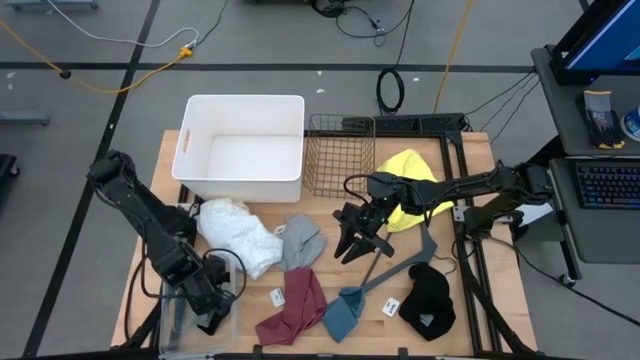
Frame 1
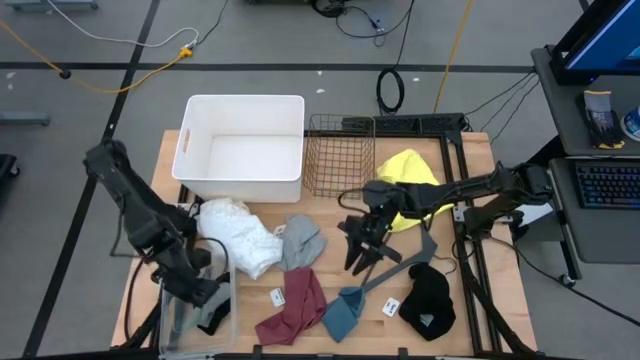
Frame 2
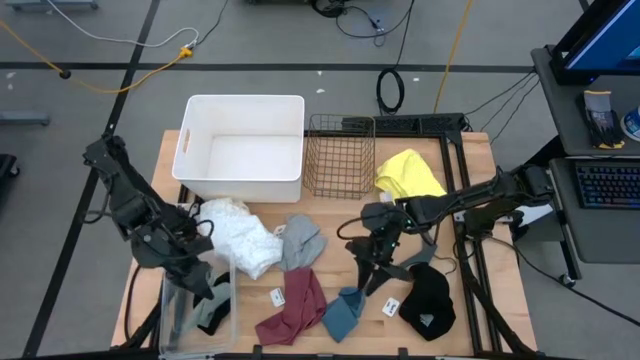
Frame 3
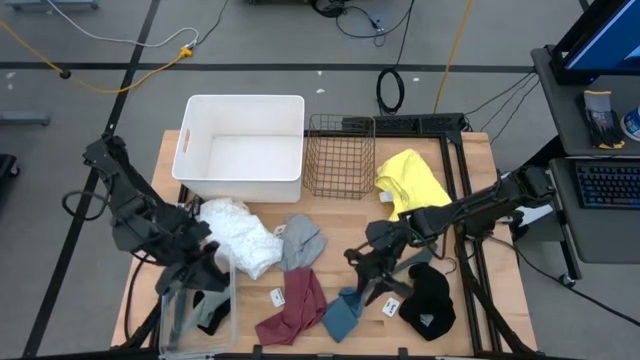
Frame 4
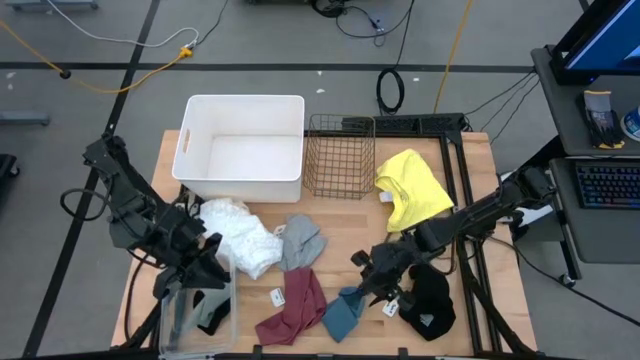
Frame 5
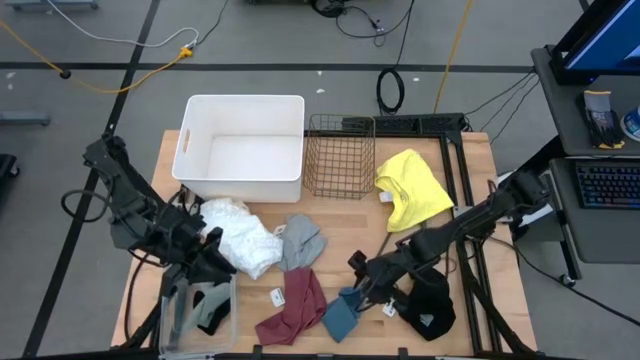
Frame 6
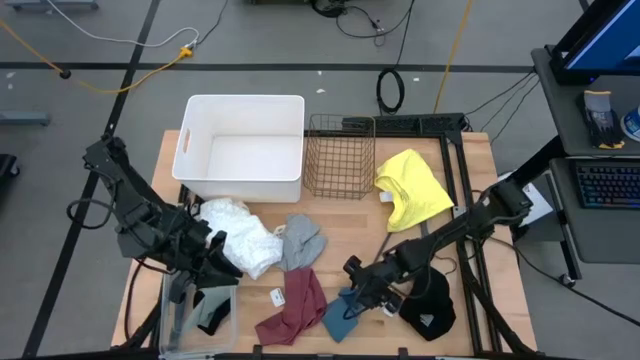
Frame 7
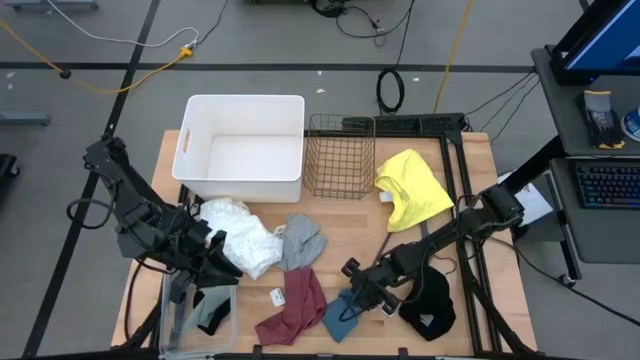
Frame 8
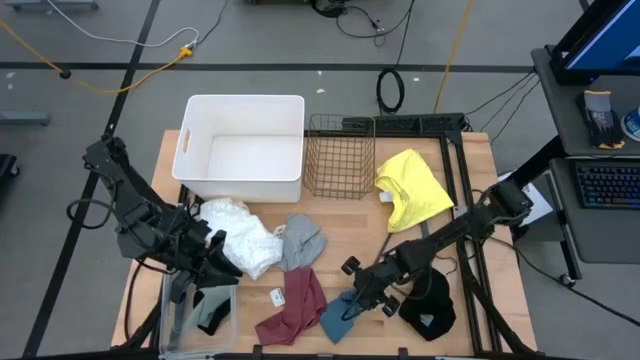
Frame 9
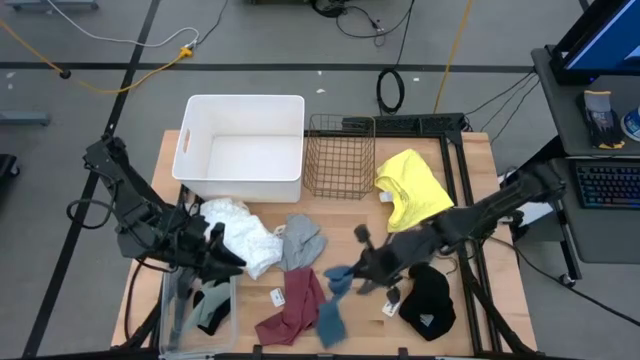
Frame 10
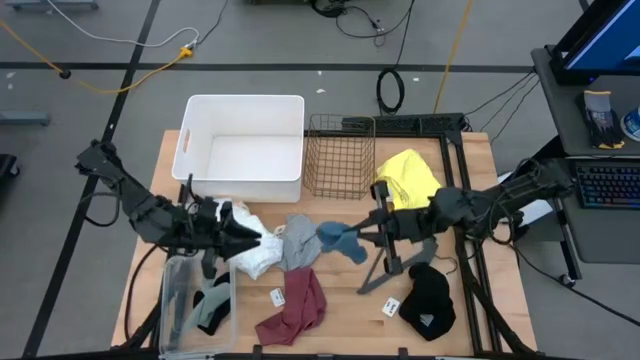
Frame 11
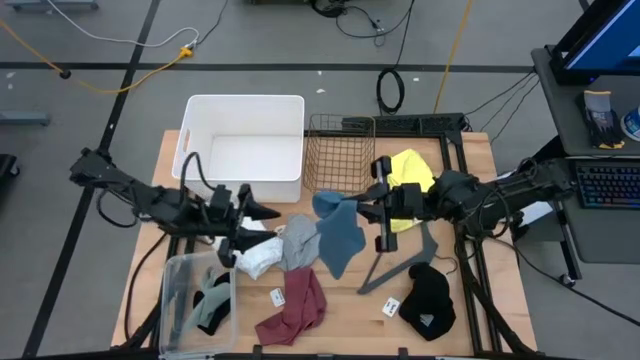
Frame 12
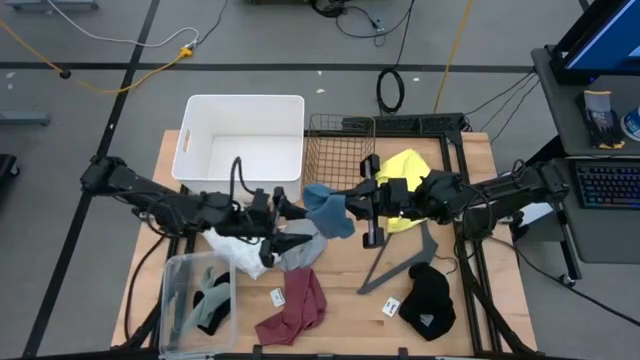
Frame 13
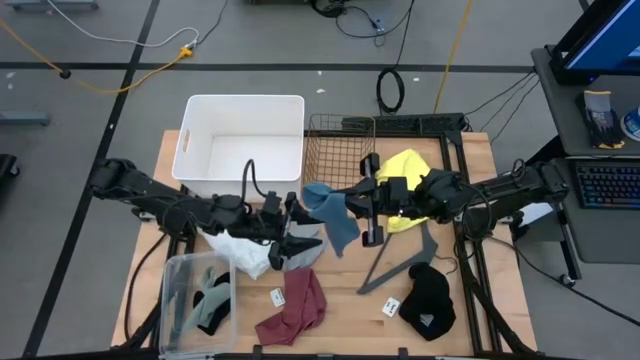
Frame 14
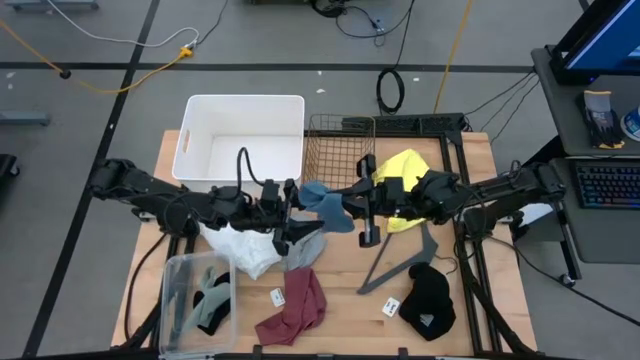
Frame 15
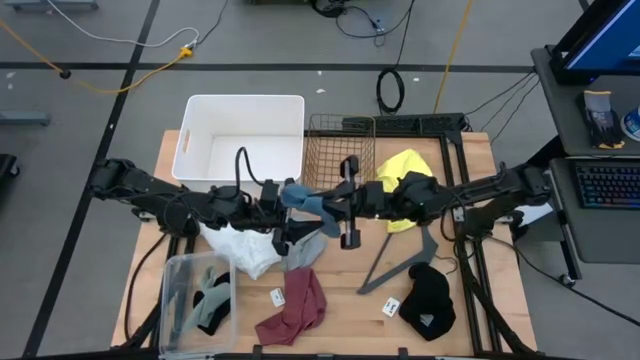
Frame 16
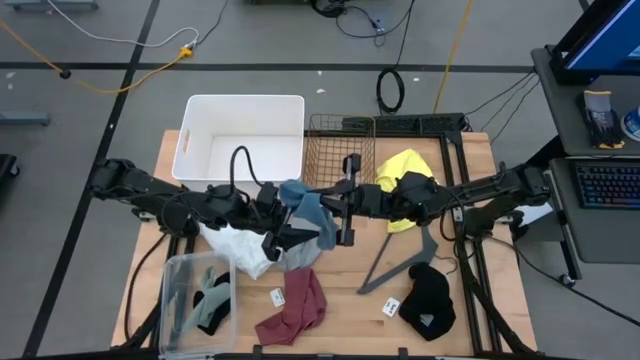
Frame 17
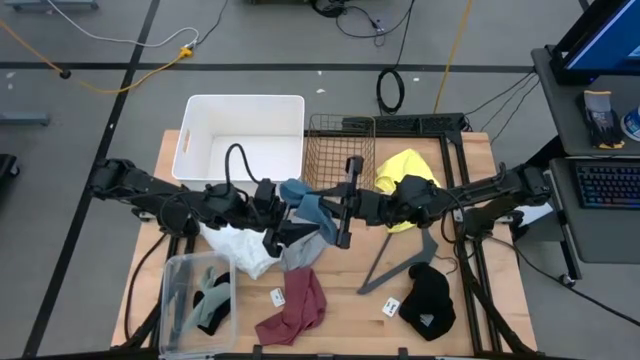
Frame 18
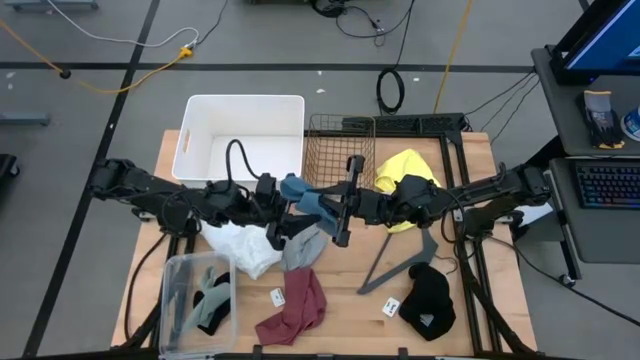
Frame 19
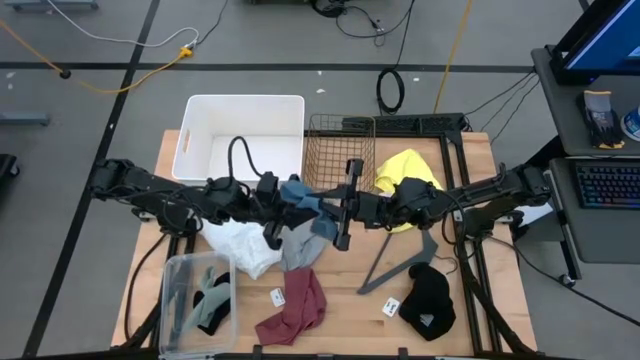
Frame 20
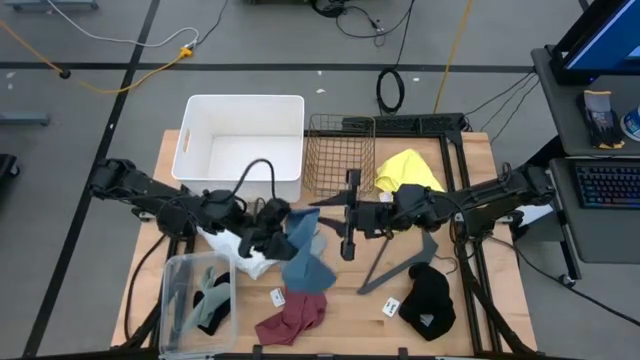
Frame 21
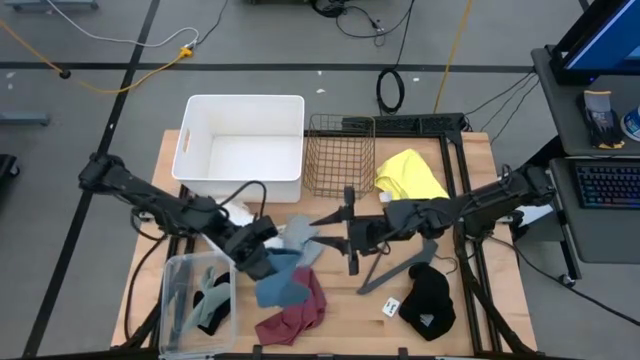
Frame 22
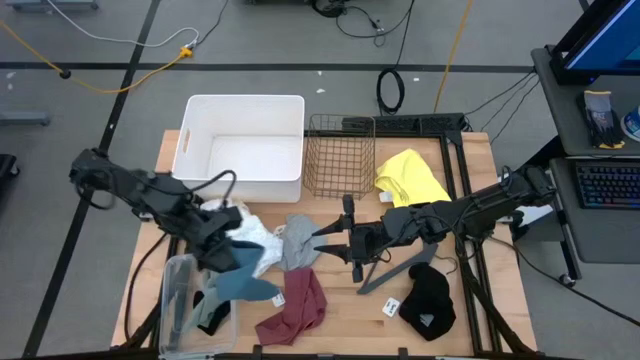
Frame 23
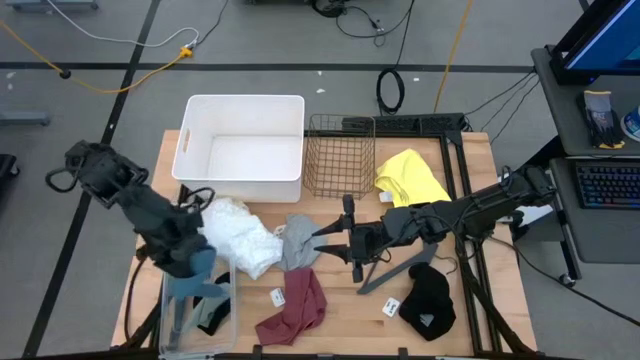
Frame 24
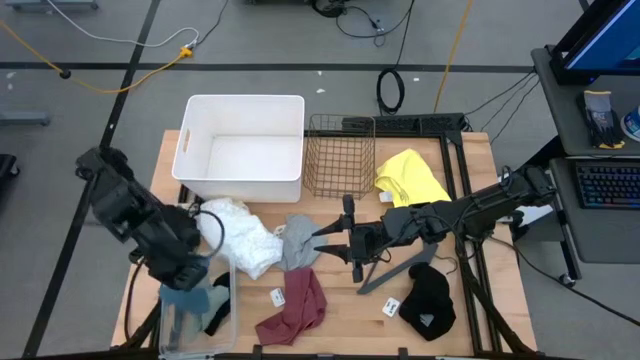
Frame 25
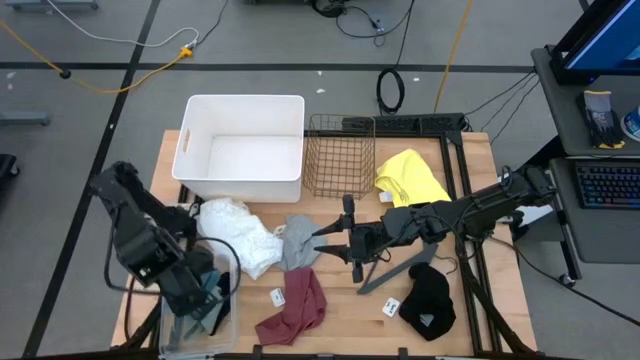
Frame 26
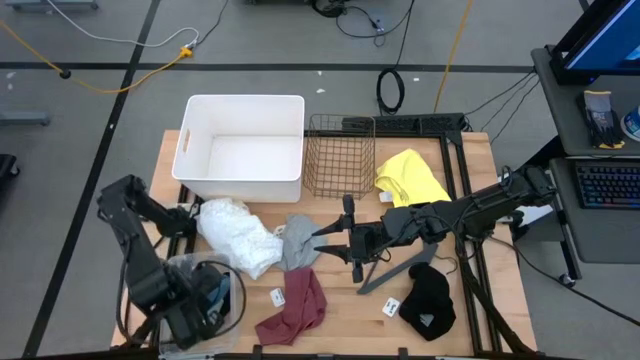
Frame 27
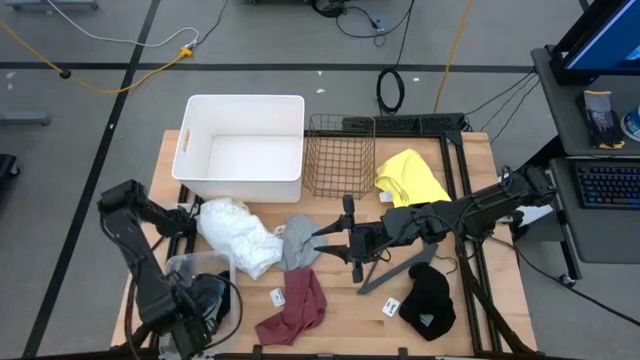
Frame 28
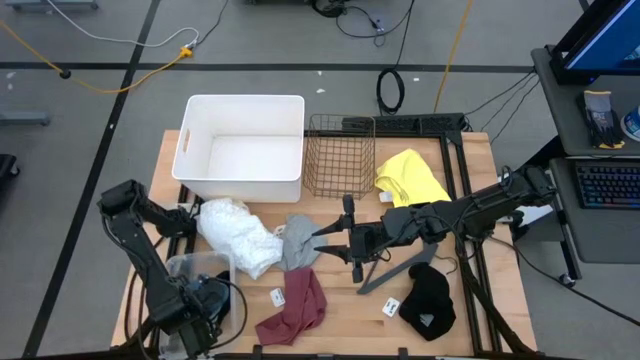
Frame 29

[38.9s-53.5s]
Task: Pick & Place Cloths
Put the blue sock into the transparent bin

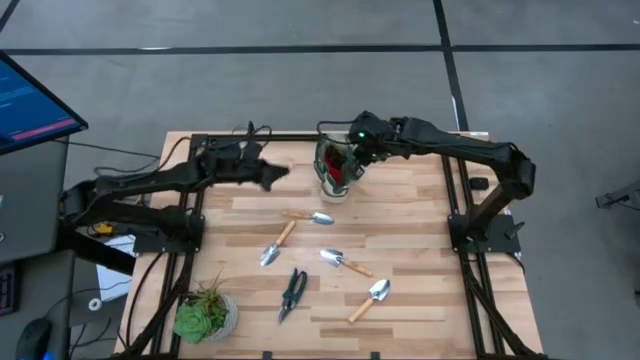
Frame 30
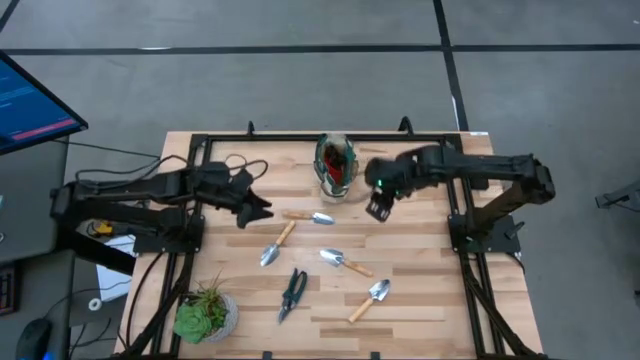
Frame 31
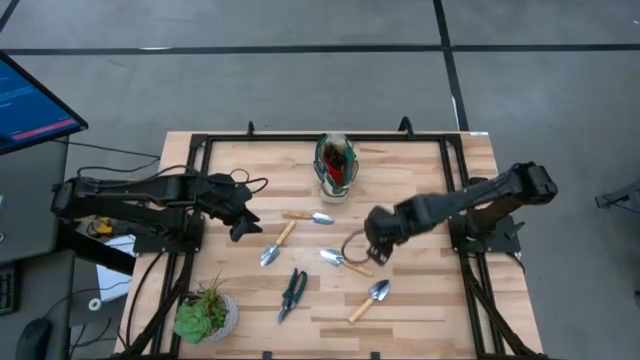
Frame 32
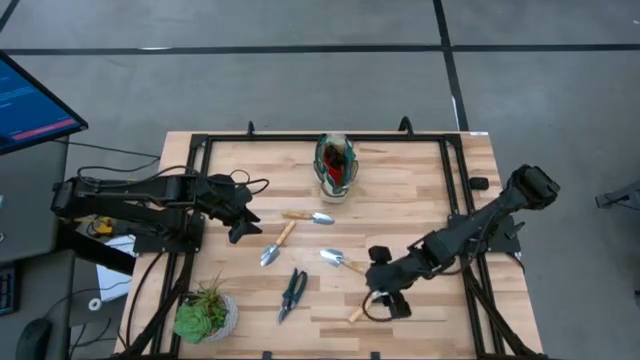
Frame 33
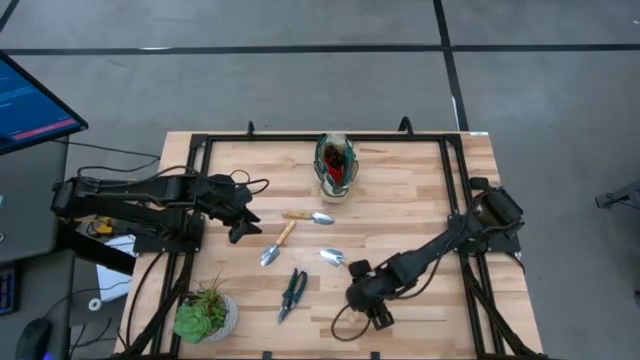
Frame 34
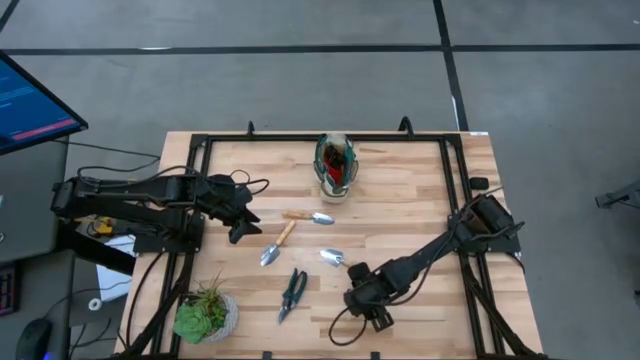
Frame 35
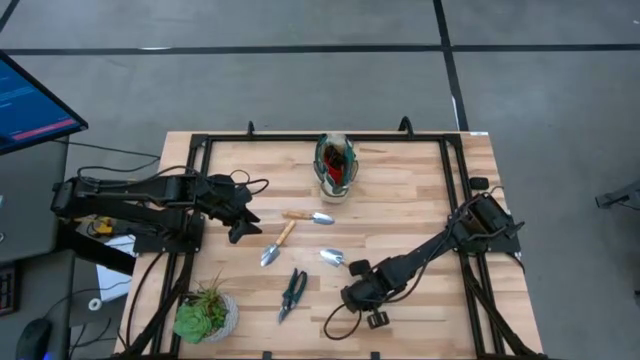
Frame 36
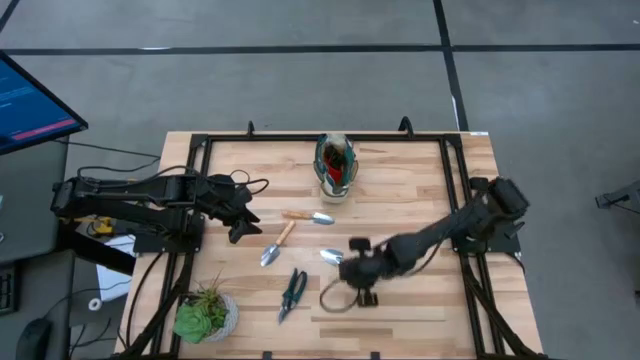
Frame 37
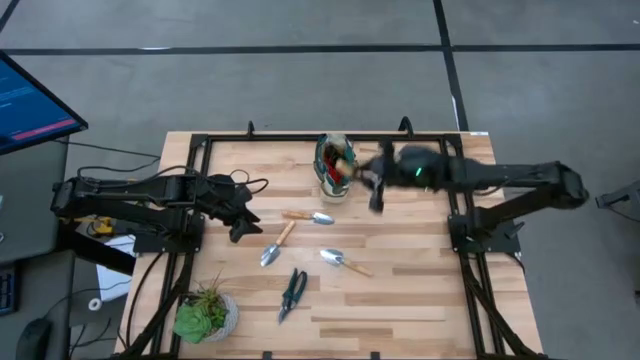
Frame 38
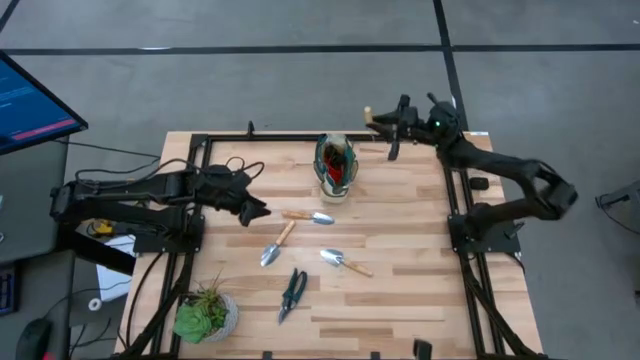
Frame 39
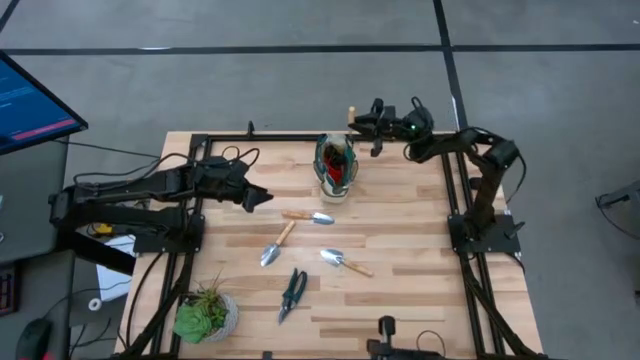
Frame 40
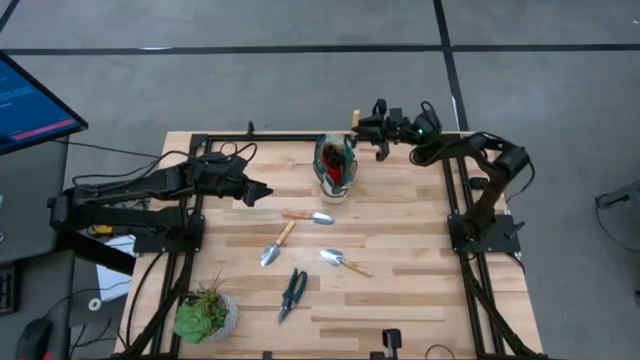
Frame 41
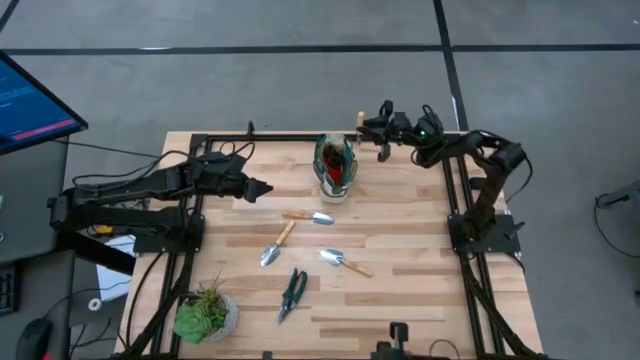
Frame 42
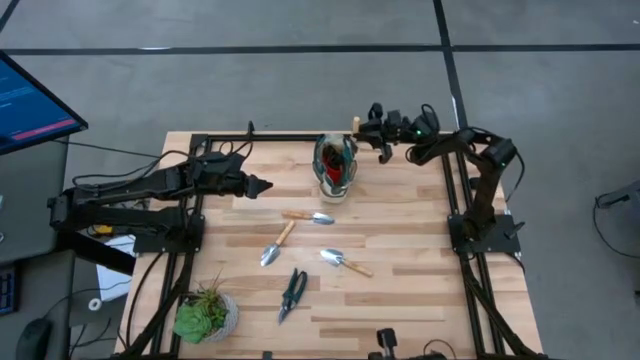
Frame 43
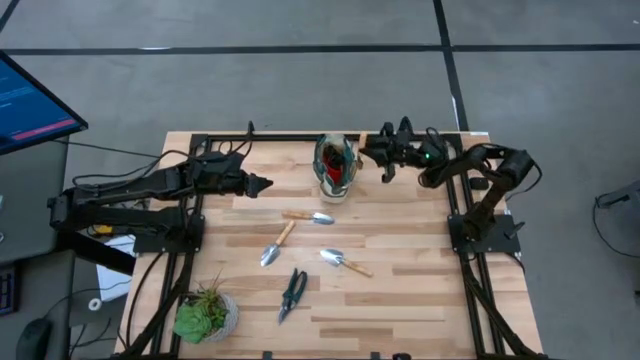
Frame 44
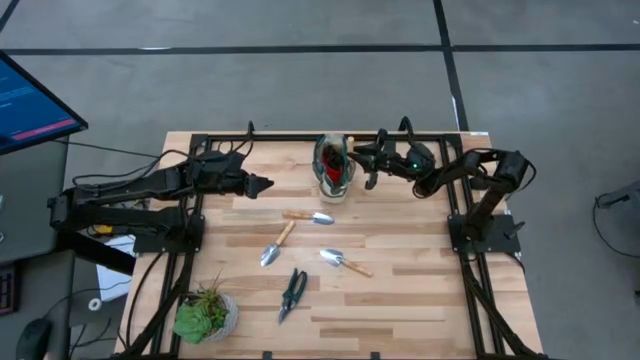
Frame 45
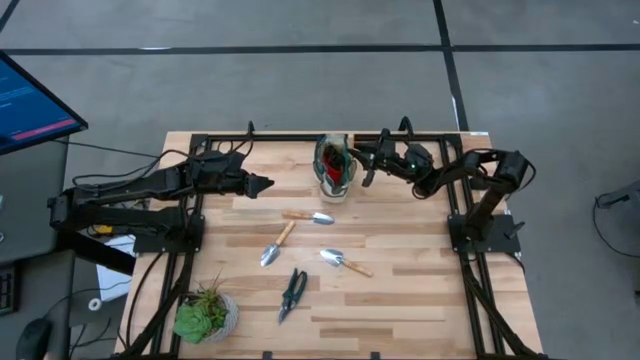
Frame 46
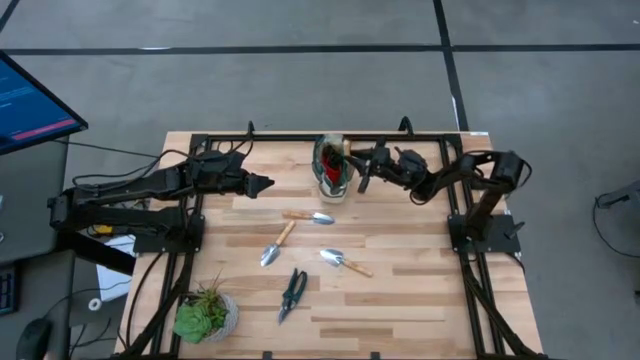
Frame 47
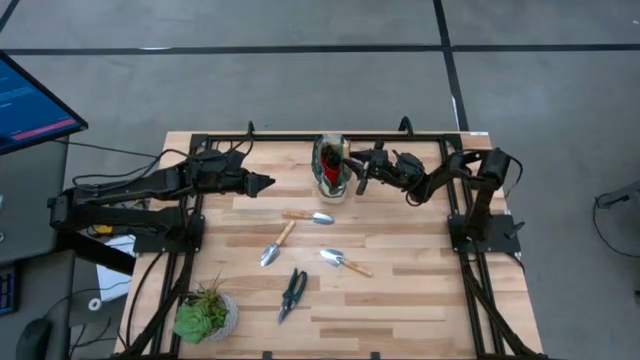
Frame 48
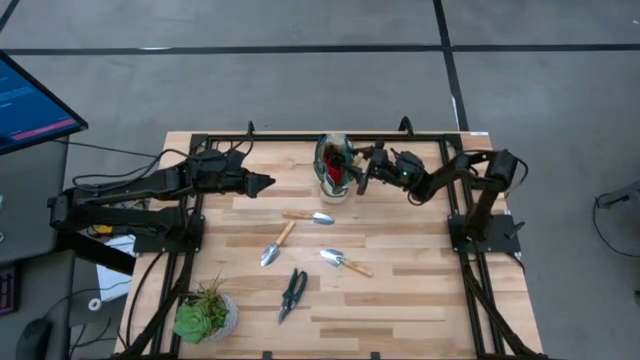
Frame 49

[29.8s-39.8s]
Task: Pick & Place Garden tools in Gardening bag
Put the trowel into the gardening bag
